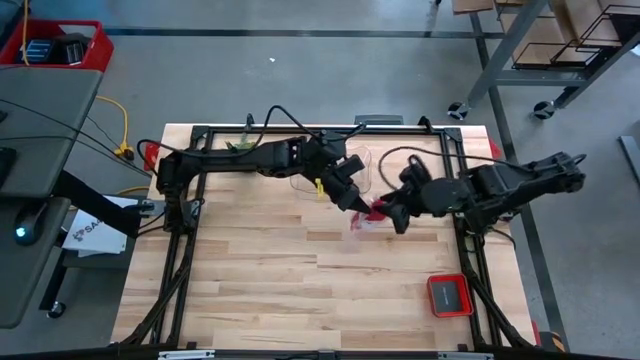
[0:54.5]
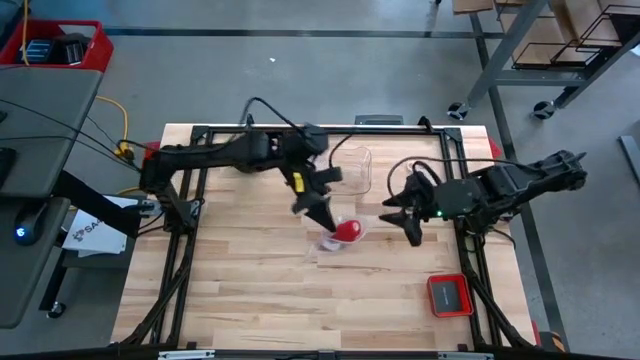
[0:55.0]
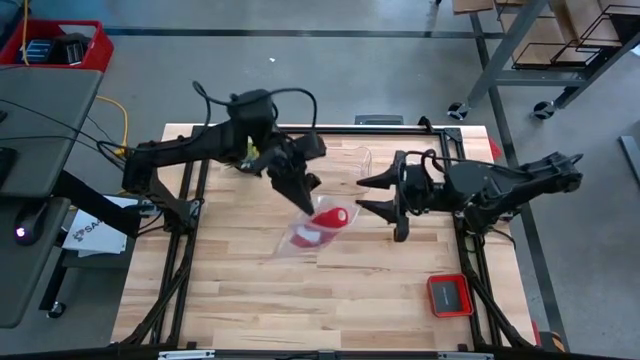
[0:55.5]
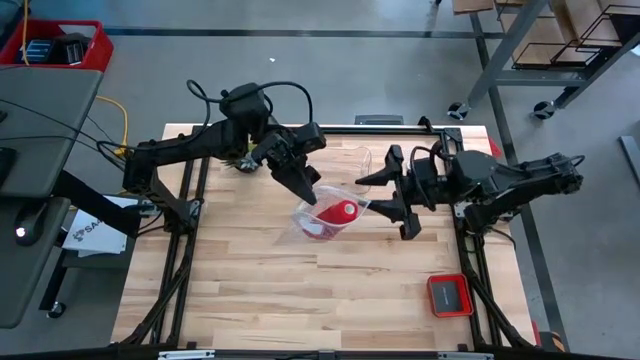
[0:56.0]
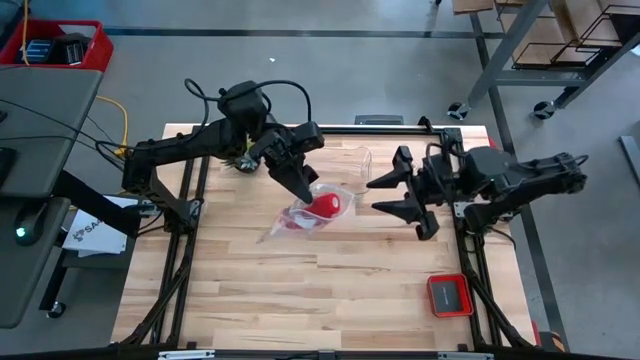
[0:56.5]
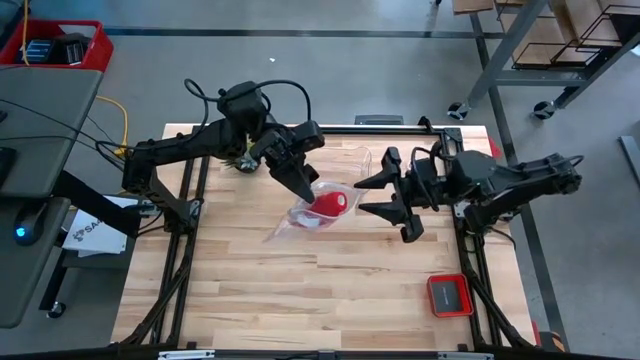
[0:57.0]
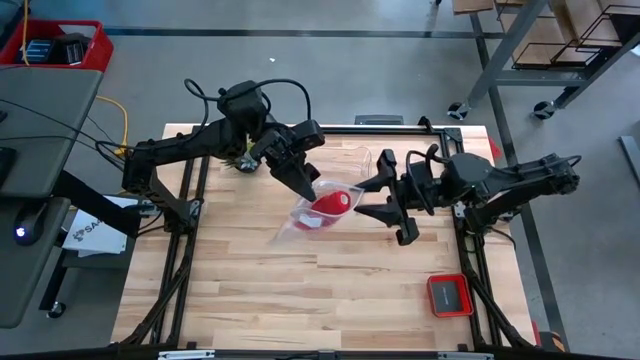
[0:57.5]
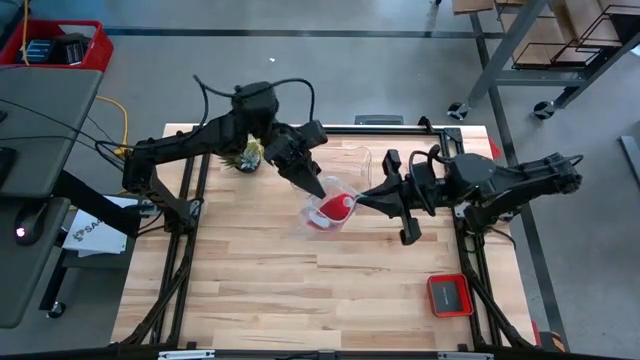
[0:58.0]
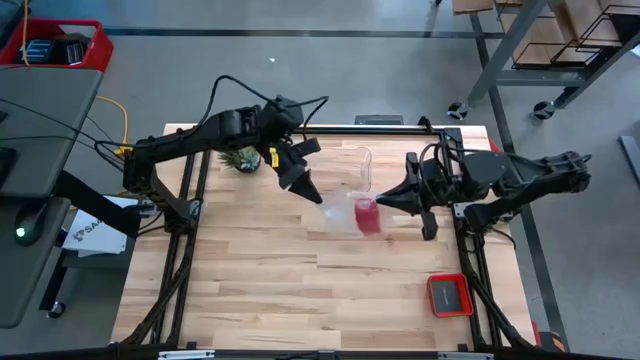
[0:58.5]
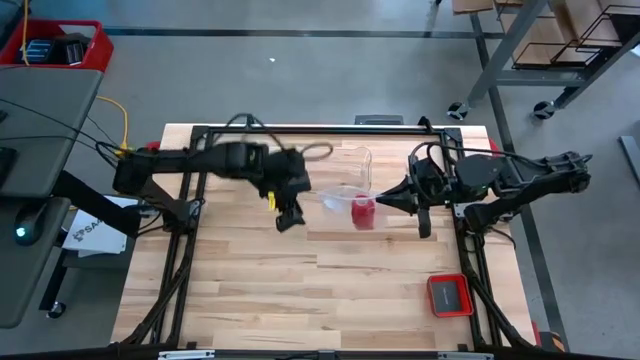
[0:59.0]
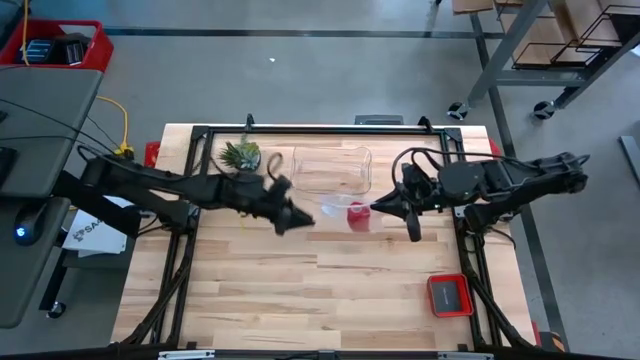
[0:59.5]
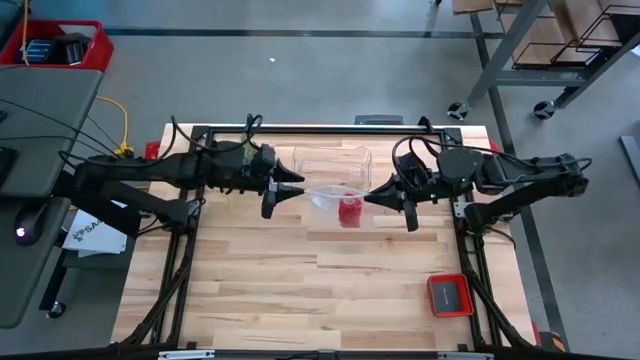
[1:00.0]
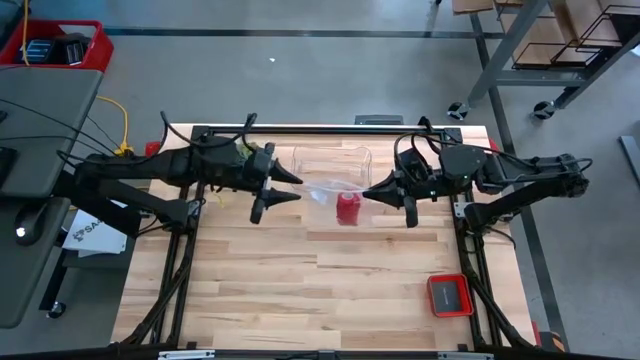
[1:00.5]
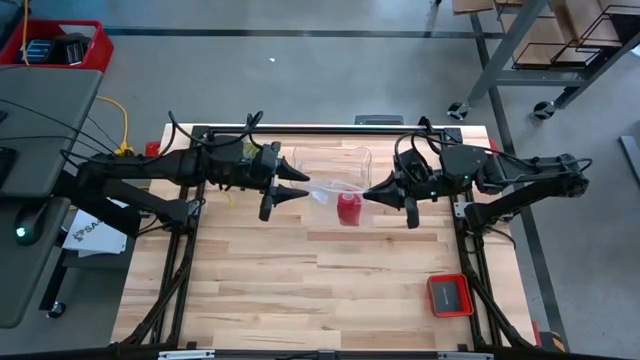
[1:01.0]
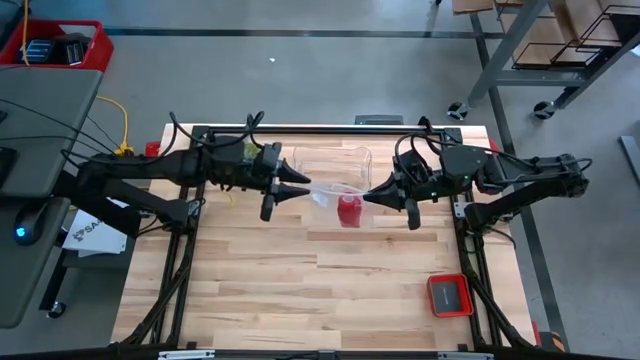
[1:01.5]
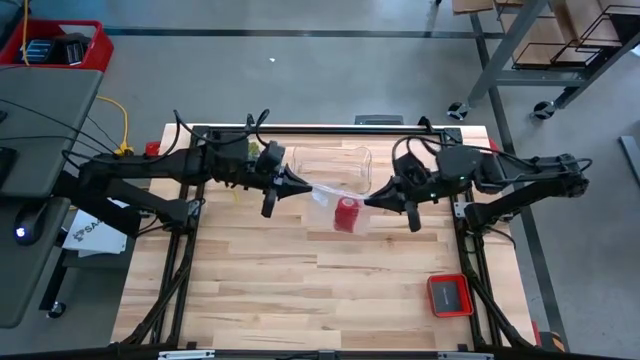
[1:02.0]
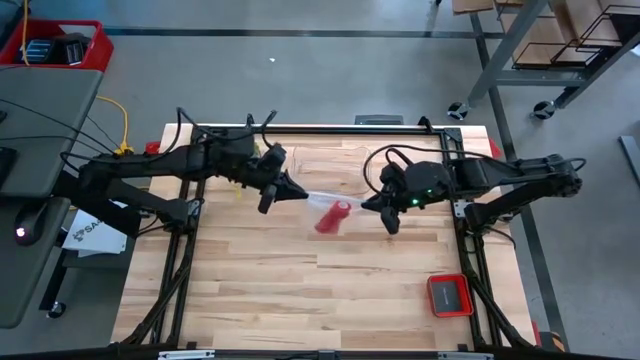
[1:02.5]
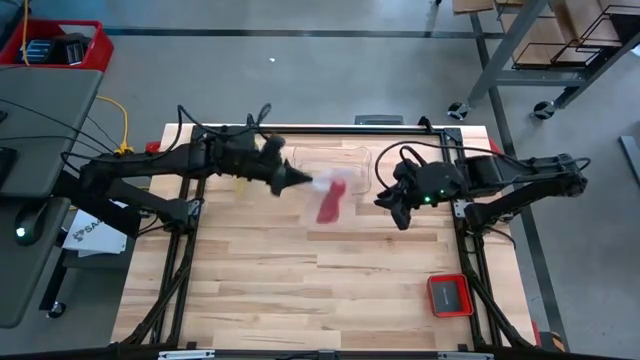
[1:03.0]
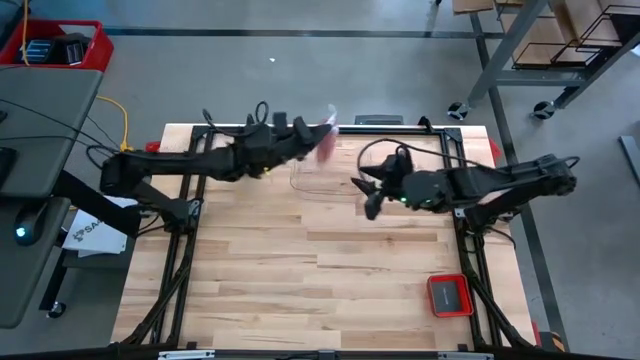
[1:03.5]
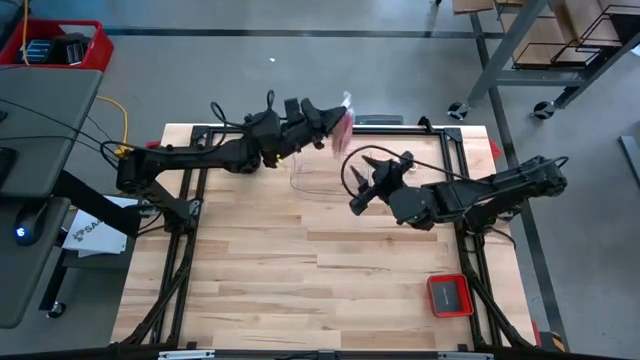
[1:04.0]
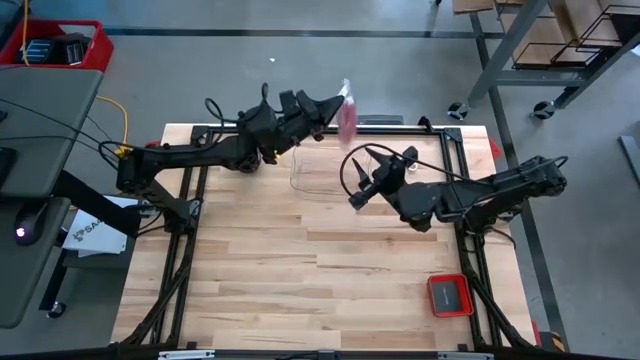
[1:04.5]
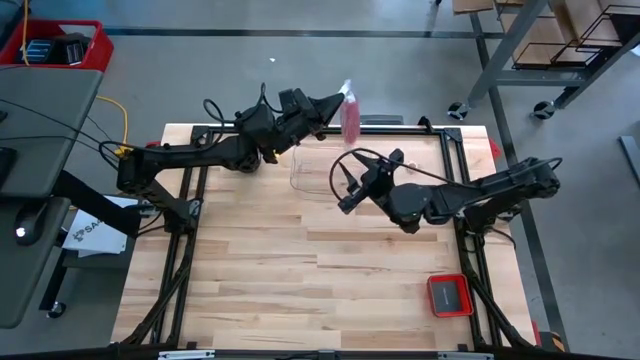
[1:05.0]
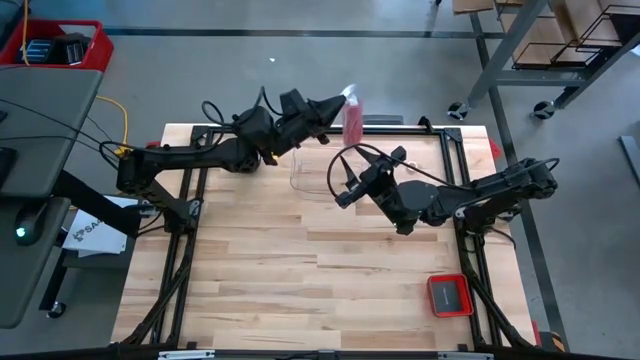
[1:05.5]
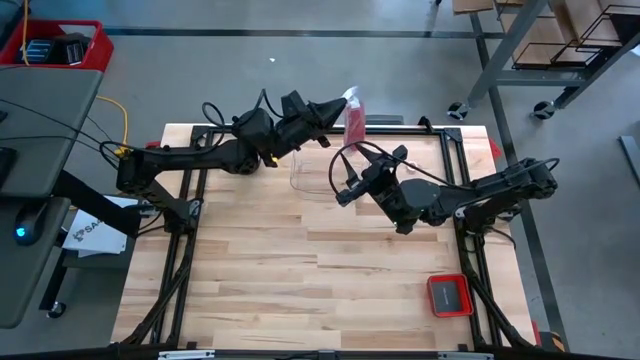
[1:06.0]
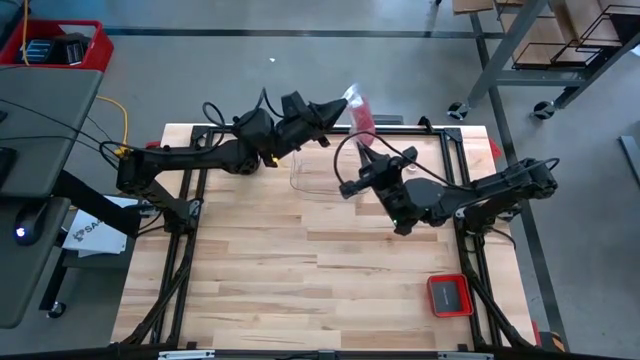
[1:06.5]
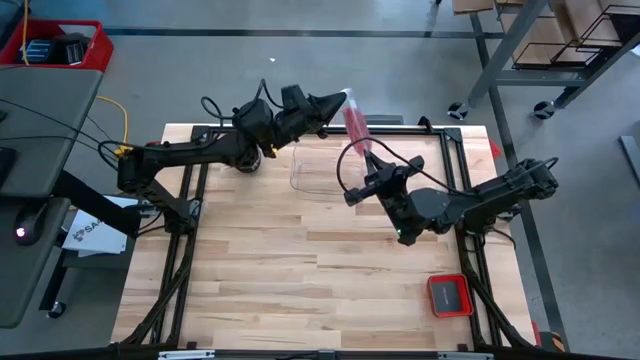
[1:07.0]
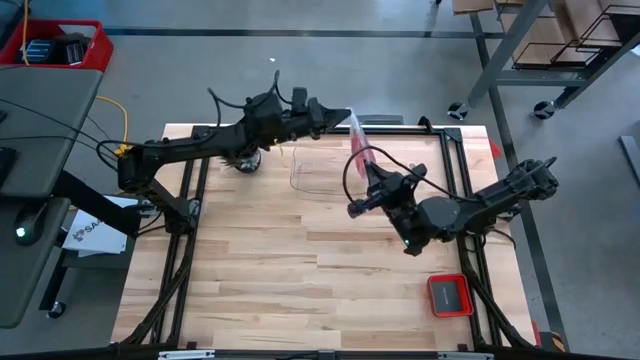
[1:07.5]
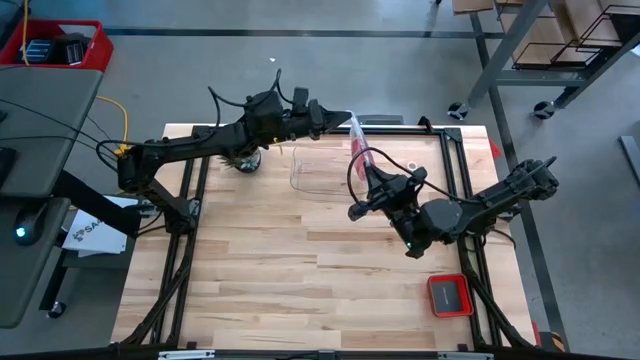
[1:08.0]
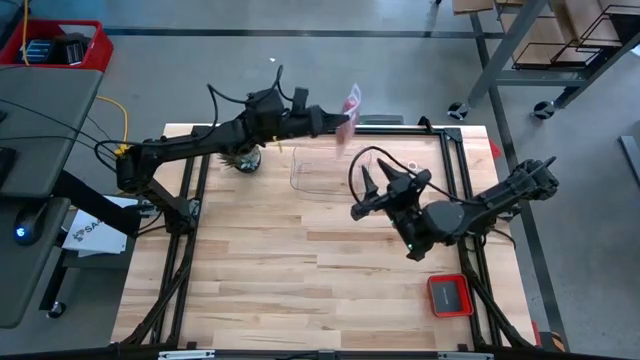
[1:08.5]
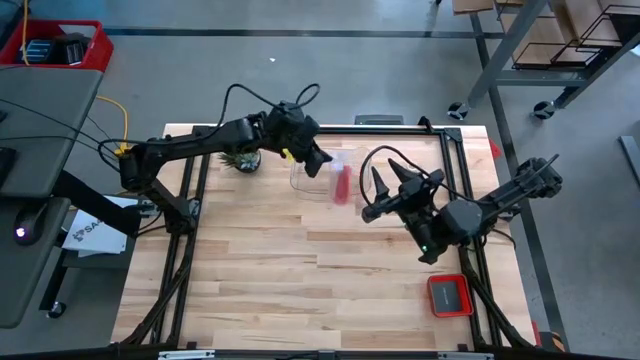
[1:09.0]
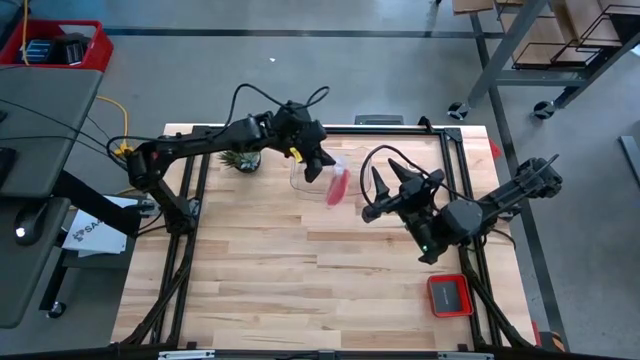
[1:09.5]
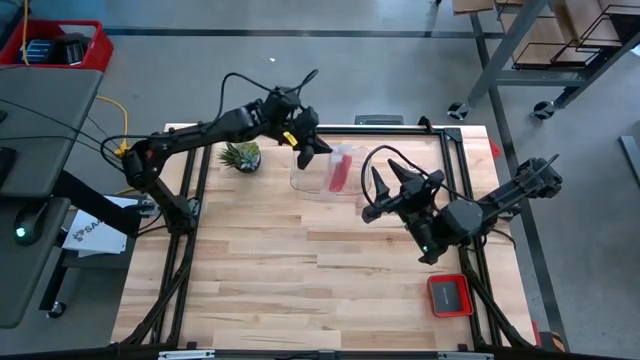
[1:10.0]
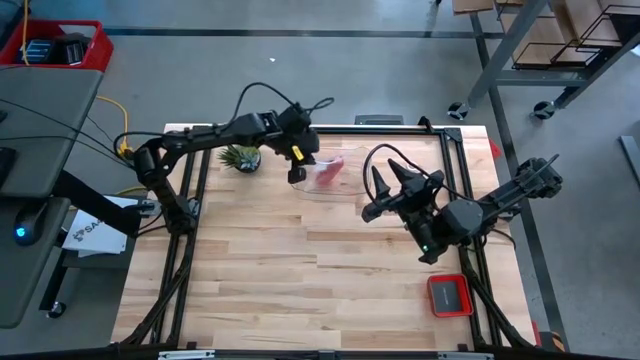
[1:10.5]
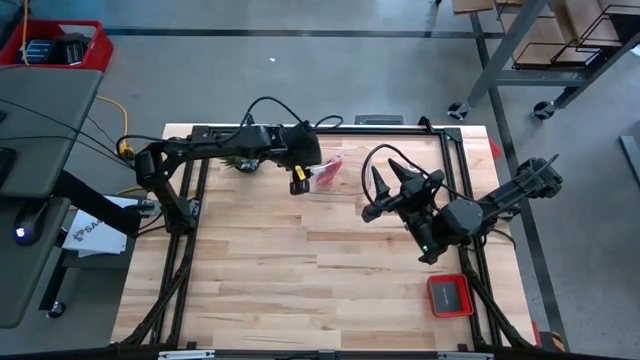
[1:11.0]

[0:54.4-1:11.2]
Task: Roll bandage
Put the transparent zip bag containing the rolled red bandage into the transparent container

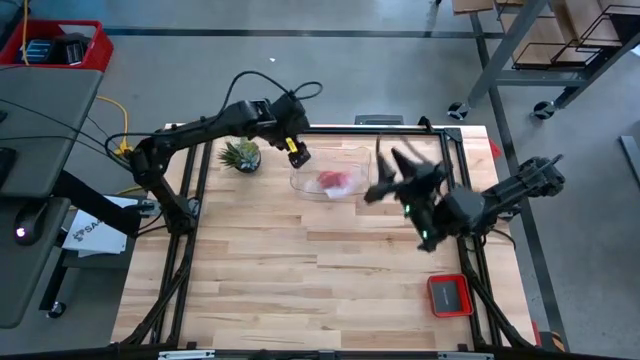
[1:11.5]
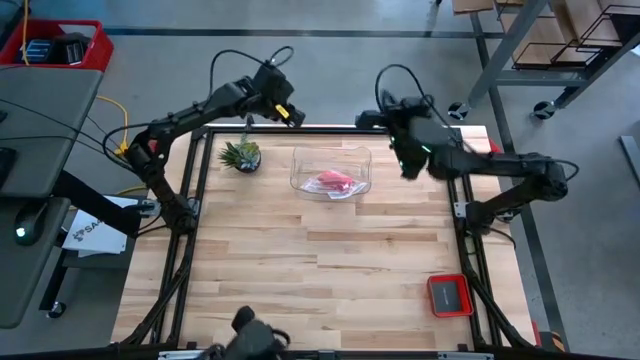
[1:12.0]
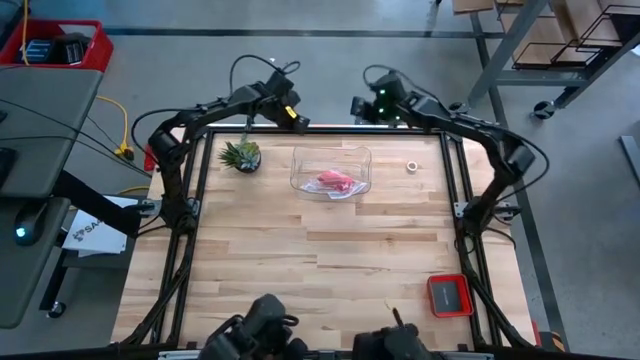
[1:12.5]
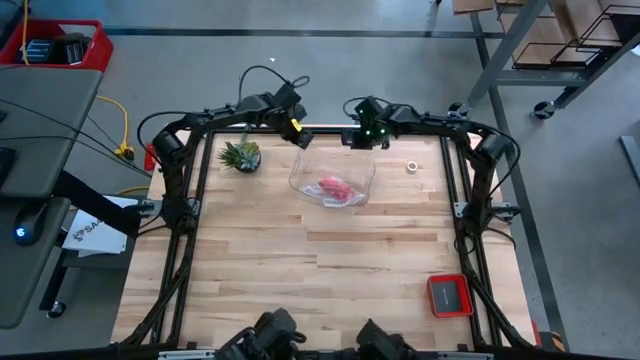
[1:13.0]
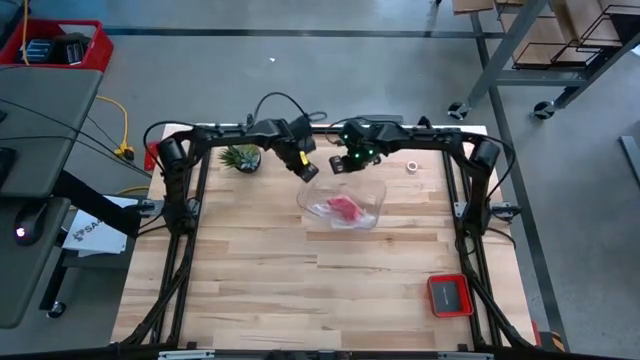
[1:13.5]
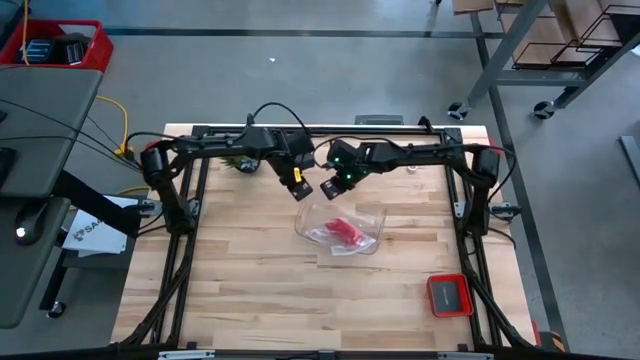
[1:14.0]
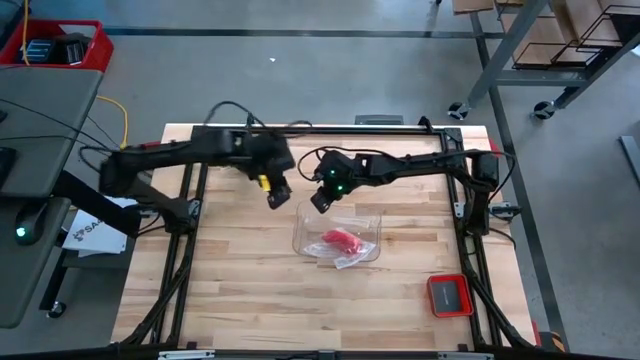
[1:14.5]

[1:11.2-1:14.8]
Move the transparent container to the center of the table
